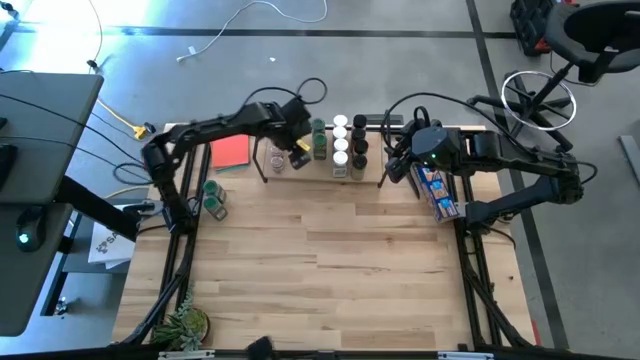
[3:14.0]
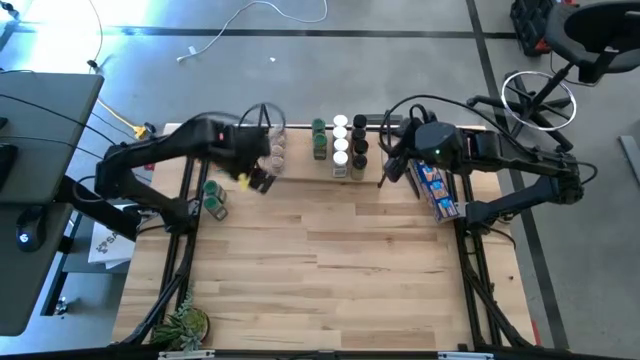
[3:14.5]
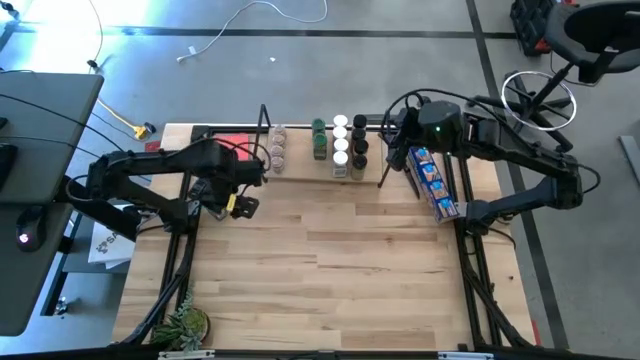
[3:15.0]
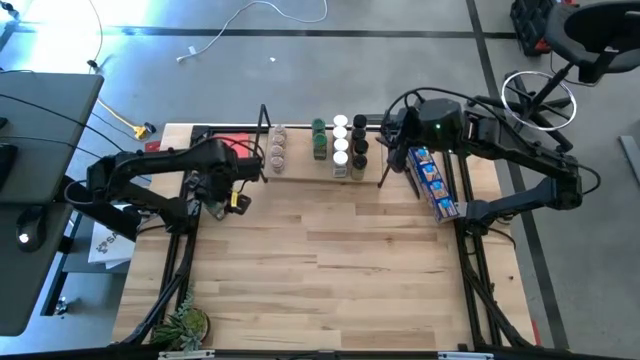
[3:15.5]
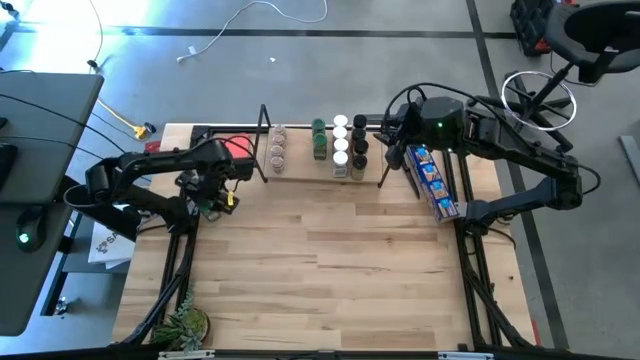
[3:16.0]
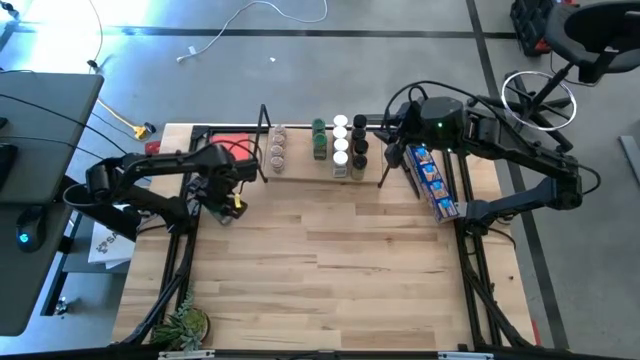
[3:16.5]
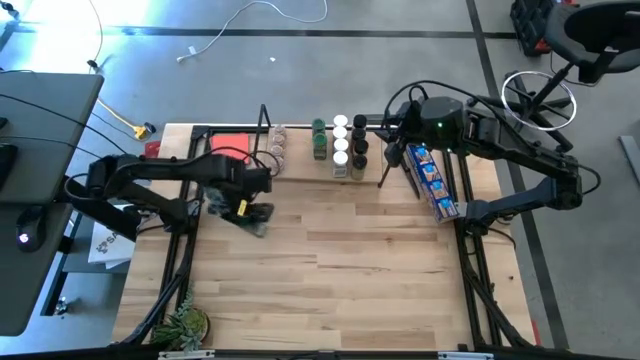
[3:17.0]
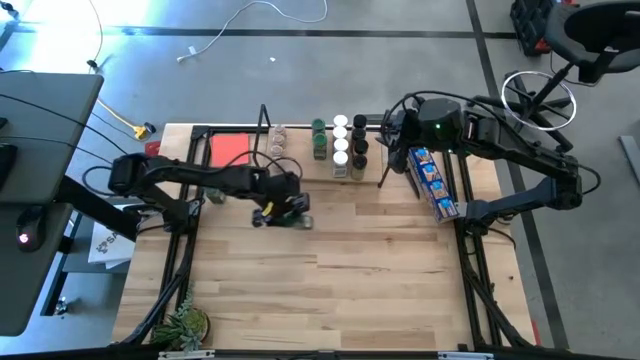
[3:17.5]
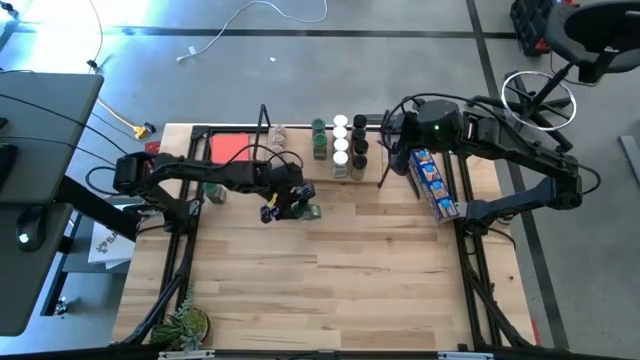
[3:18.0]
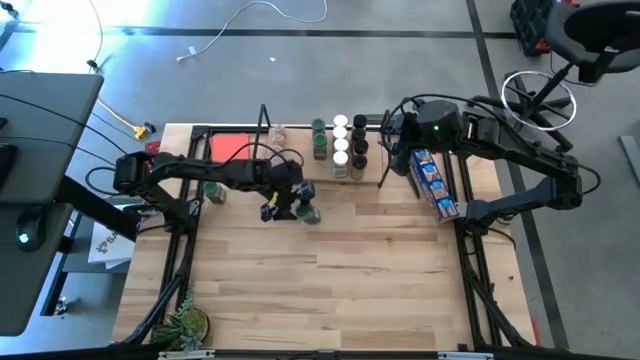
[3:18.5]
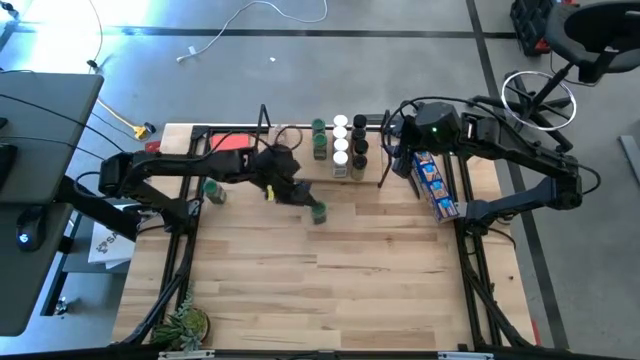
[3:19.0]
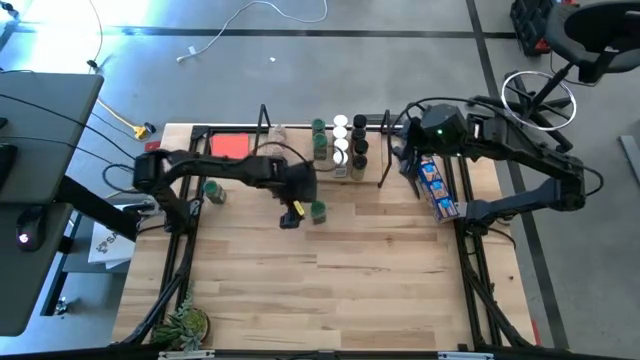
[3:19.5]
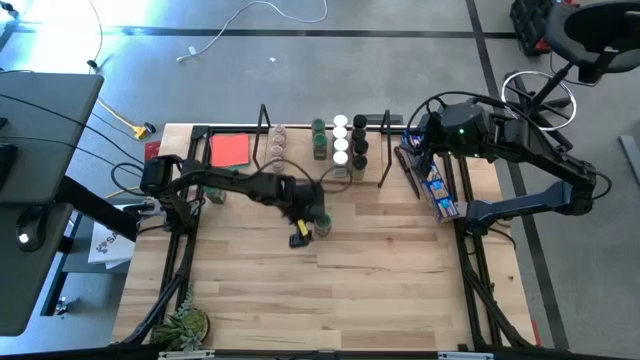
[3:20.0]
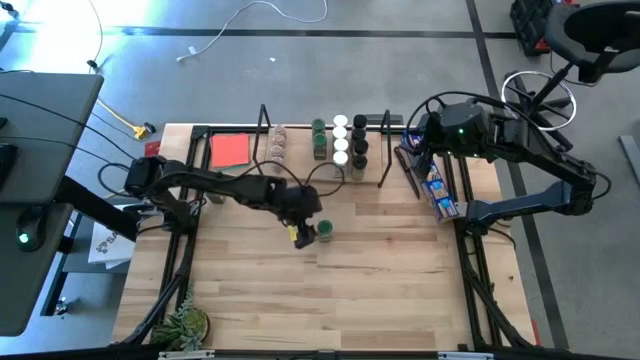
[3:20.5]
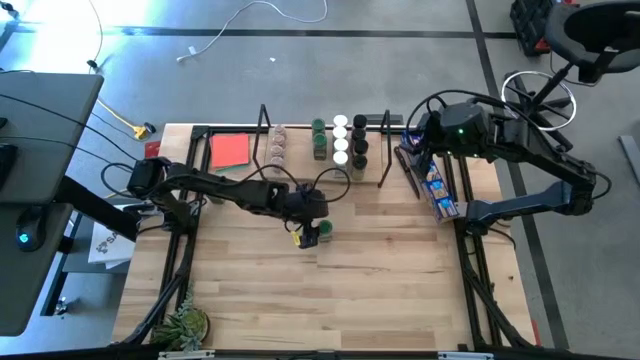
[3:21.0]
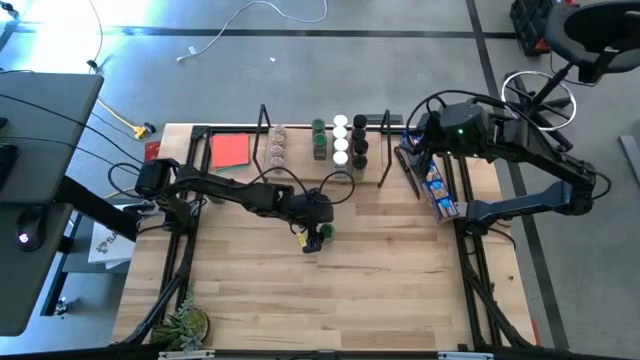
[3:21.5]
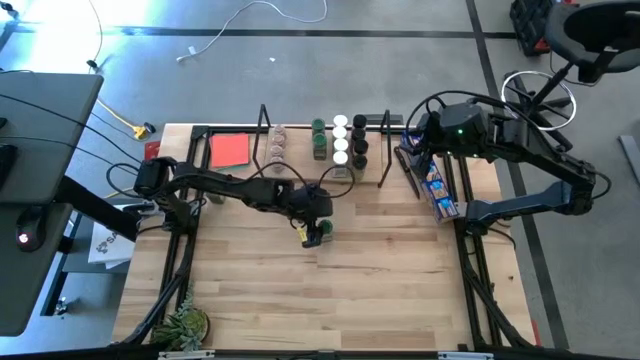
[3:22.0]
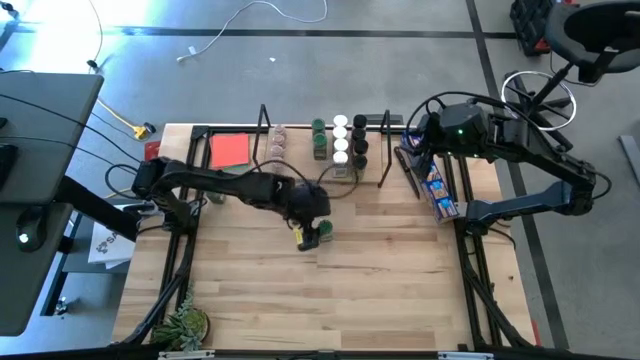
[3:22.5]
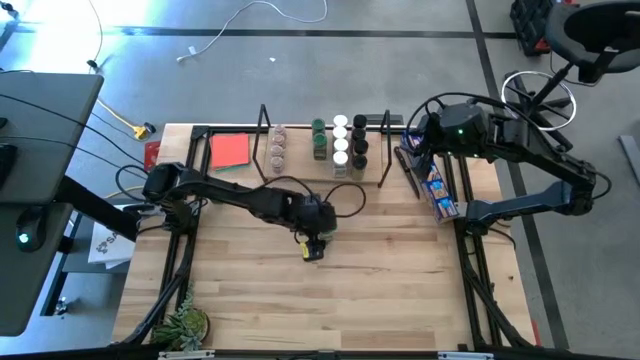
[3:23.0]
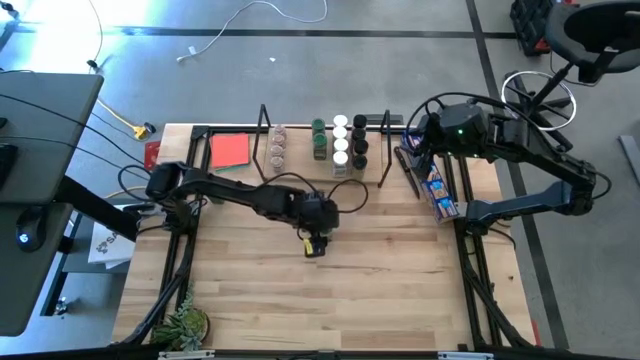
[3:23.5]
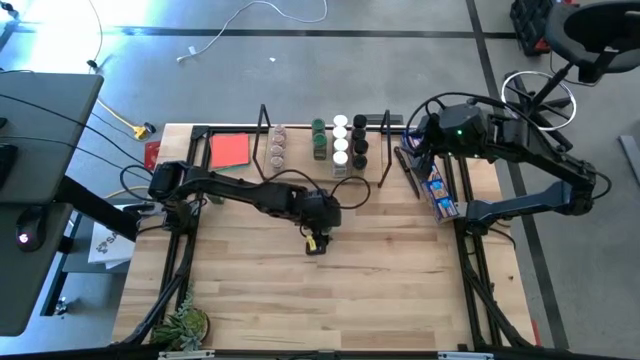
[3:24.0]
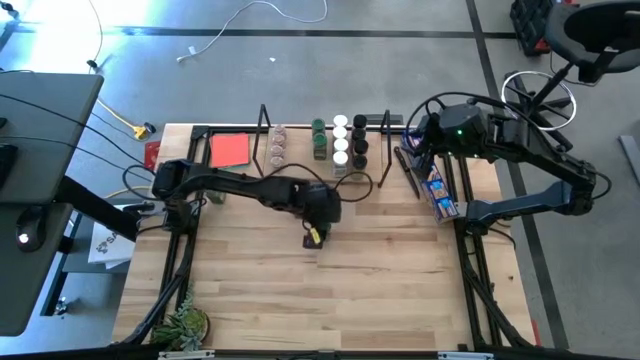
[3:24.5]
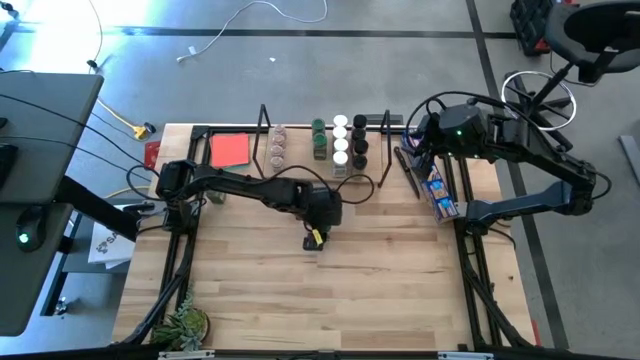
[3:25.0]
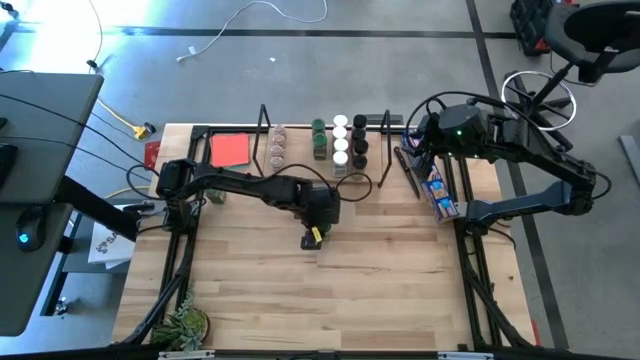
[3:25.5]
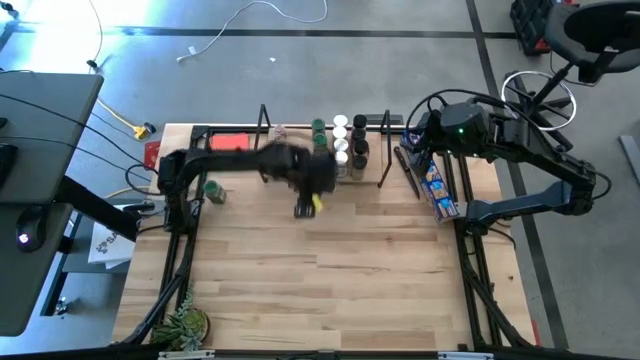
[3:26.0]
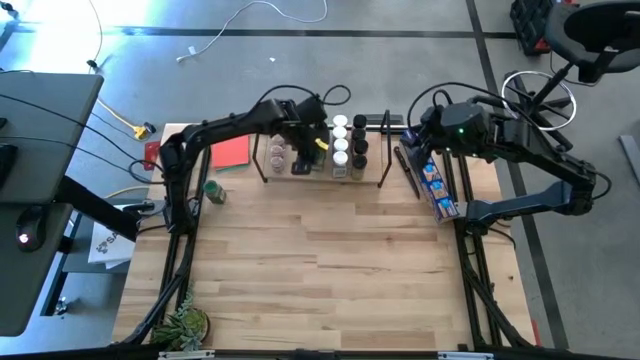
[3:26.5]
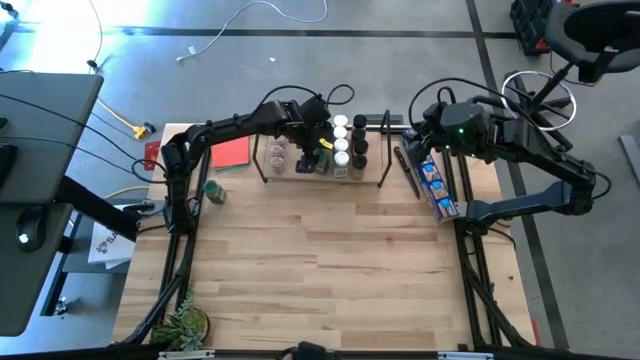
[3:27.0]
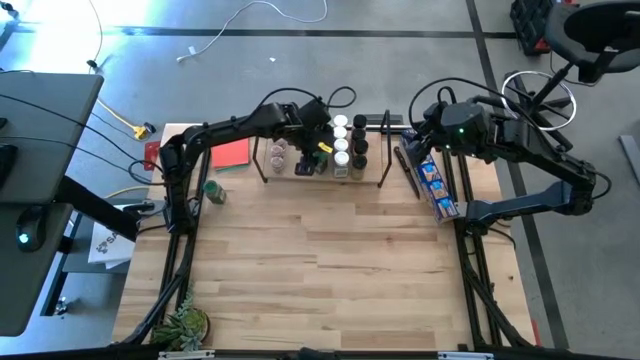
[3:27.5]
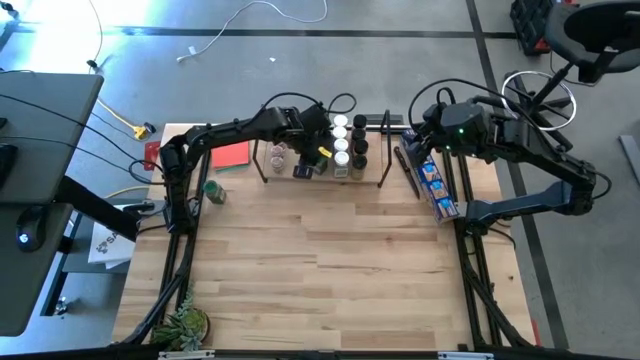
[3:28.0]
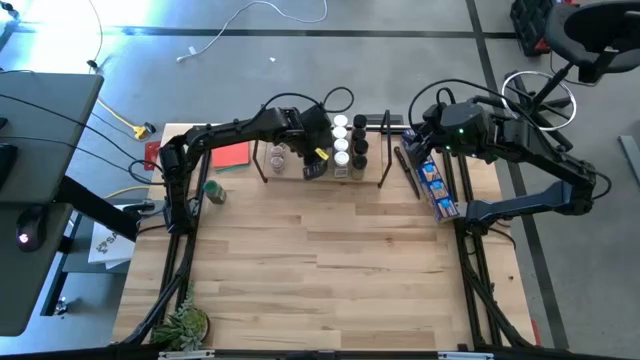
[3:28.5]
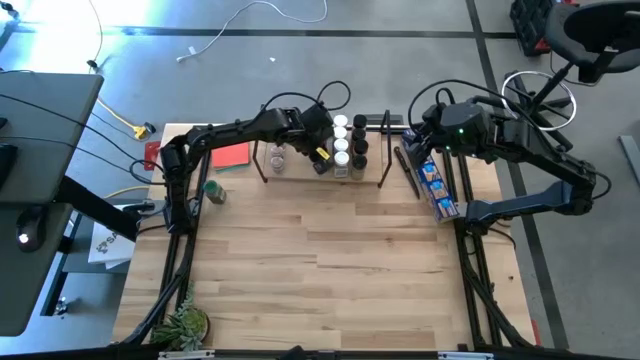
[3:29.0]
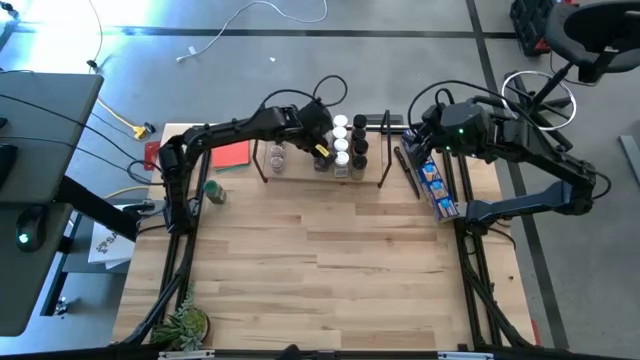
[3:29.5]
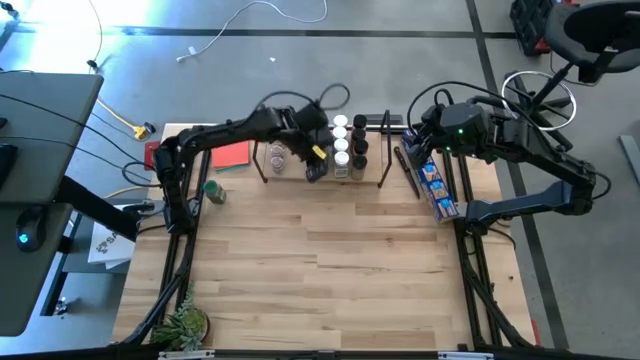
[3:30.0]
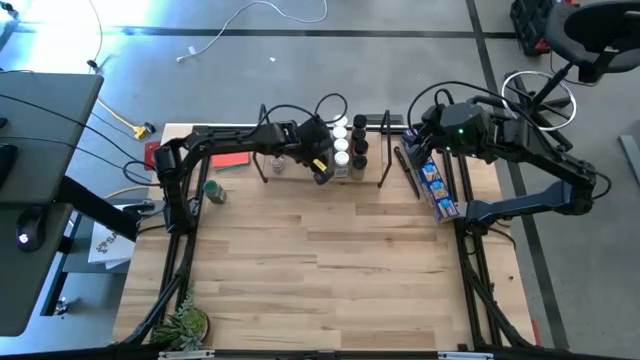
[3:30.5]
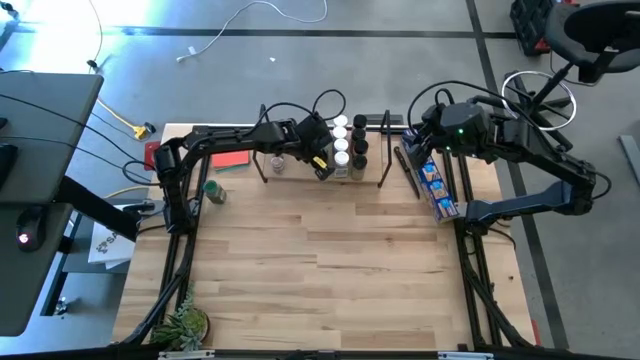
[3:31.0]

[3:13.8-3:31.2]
Task: Shelf spices
Put the bottom green seasoning bottle on the shelf aligned with the other green seasoning bottles

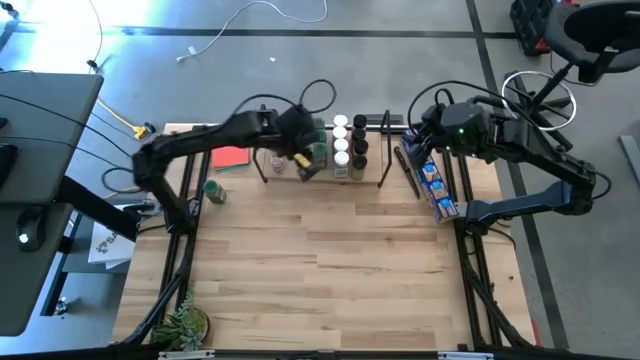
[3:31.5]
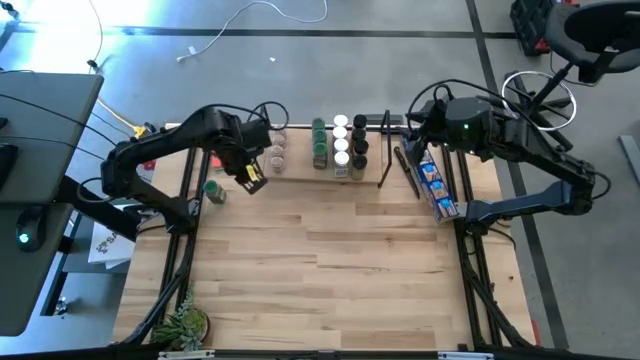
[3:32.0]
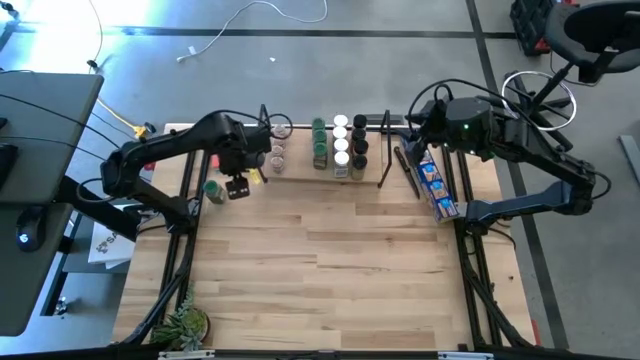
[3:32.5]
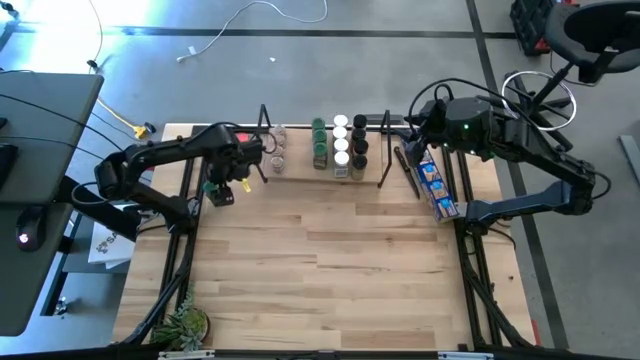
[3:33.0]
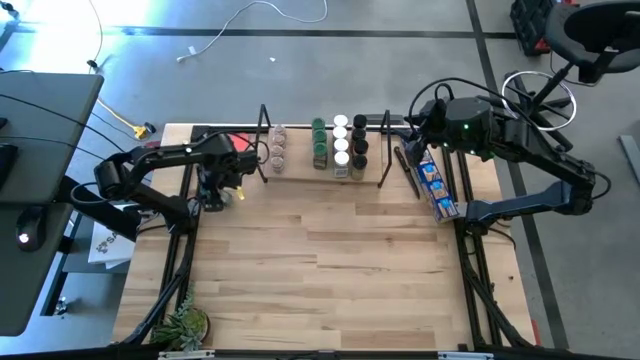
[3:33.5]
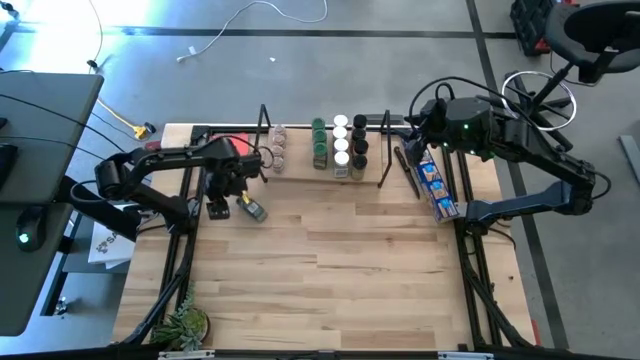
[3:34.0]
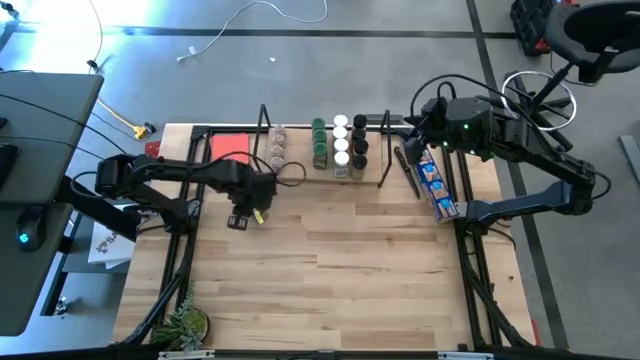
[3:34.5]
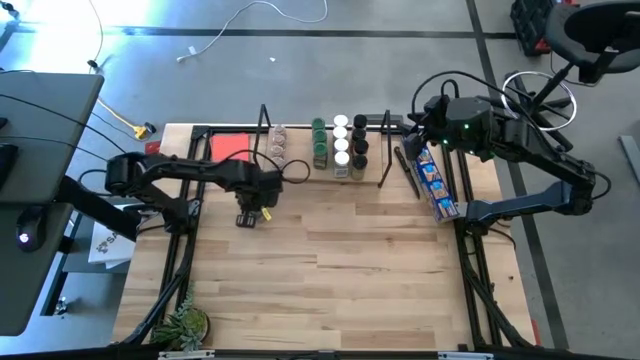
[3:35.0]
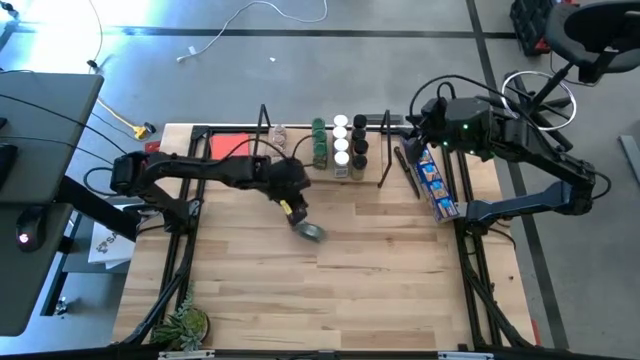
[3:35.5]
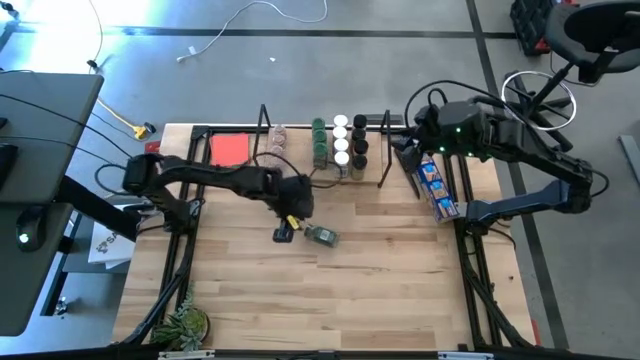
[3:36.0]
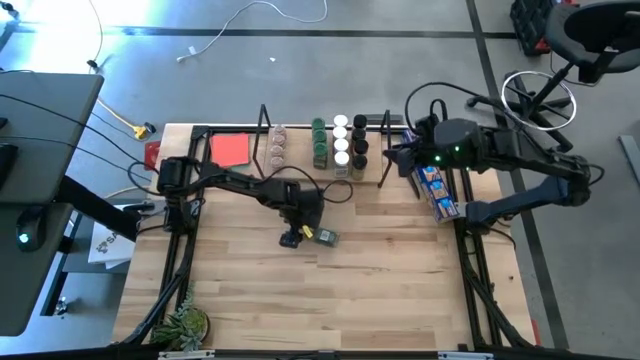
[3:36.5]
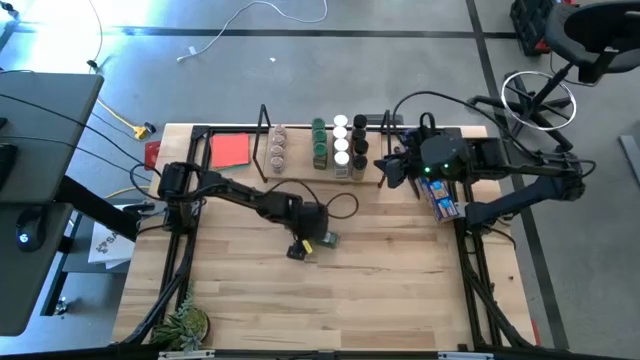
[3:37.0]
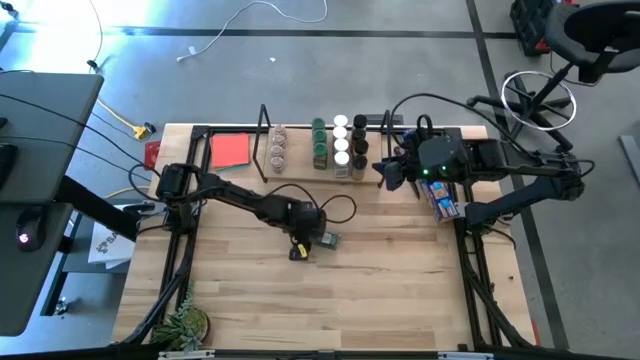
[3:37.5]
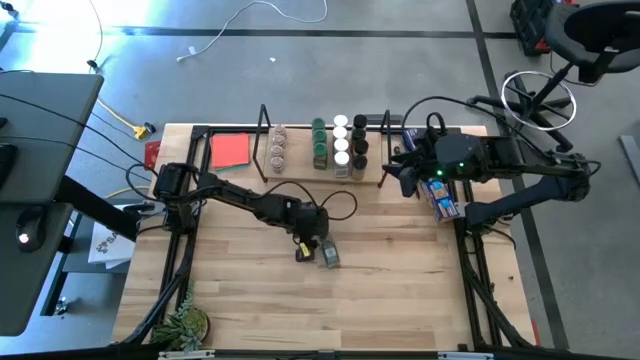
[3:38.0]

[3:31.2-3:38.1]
Put the green seasoning bottle on the shelf aligned with the other green seasoning bottles
